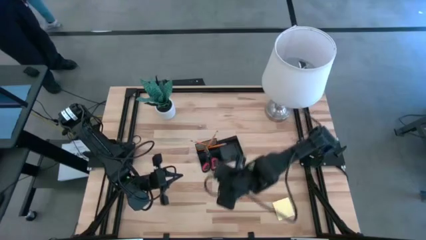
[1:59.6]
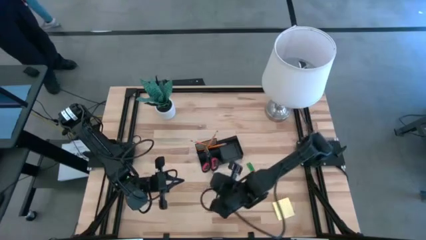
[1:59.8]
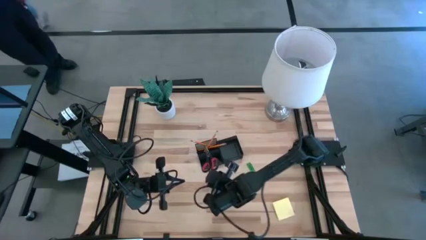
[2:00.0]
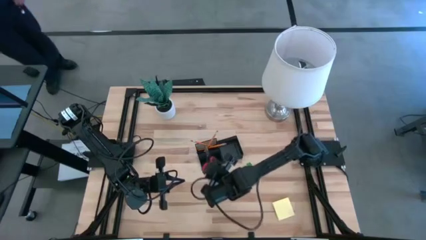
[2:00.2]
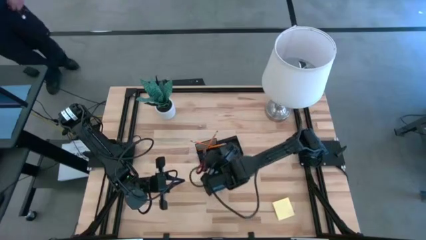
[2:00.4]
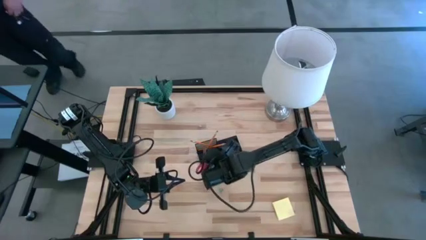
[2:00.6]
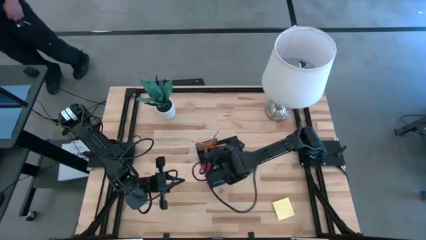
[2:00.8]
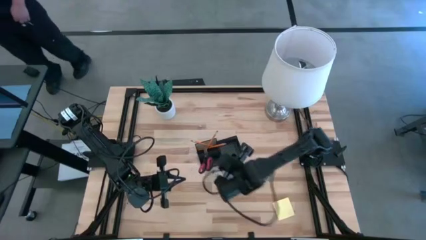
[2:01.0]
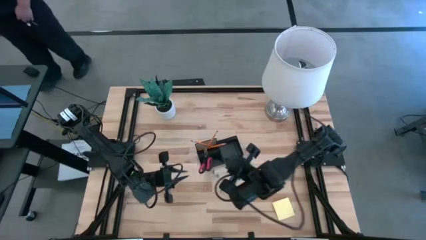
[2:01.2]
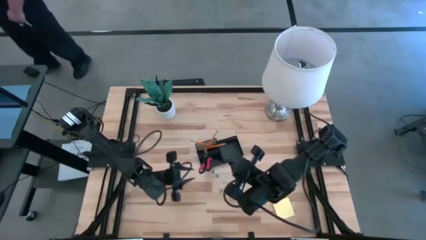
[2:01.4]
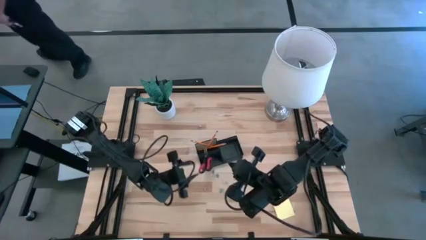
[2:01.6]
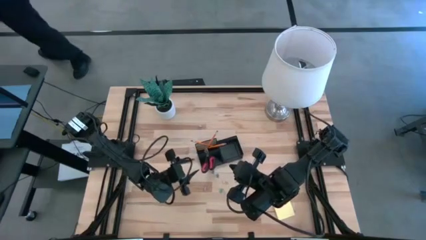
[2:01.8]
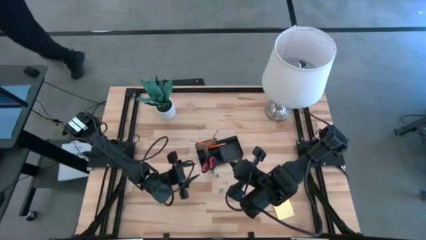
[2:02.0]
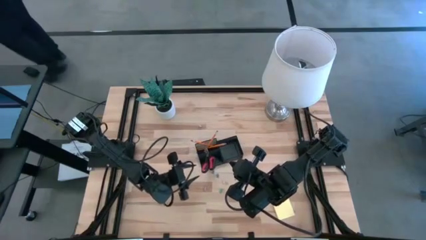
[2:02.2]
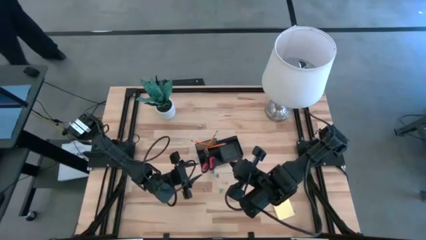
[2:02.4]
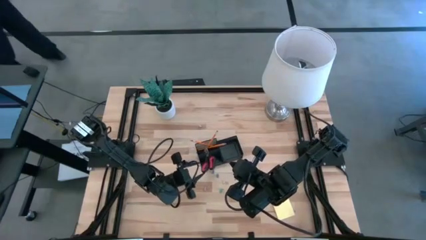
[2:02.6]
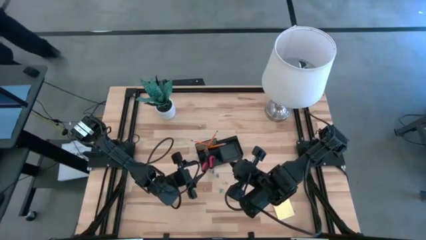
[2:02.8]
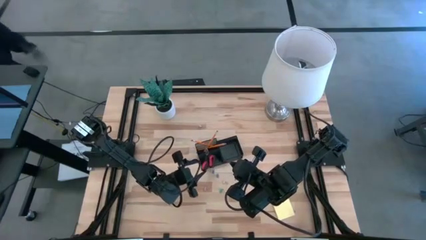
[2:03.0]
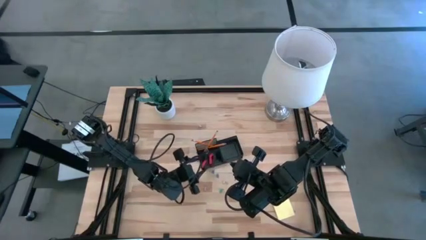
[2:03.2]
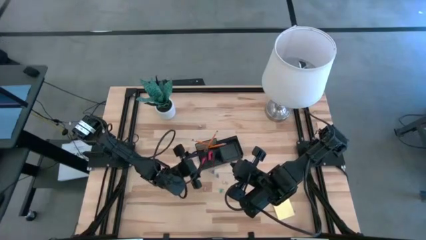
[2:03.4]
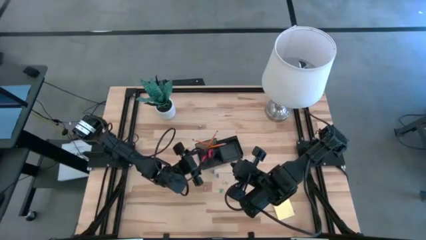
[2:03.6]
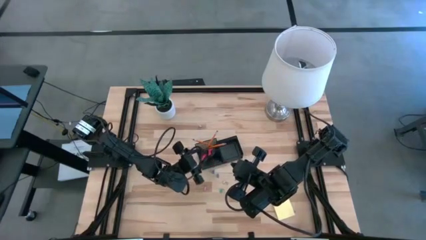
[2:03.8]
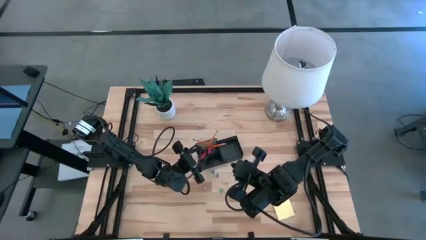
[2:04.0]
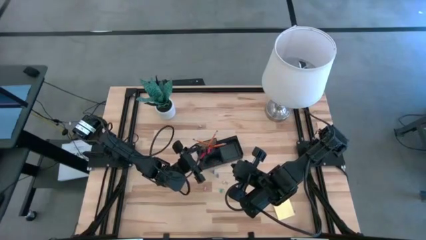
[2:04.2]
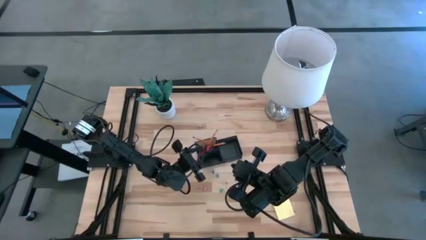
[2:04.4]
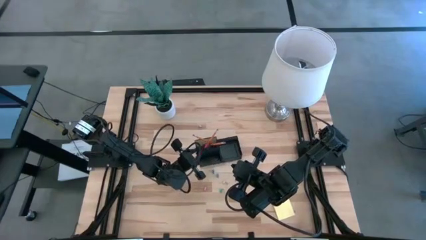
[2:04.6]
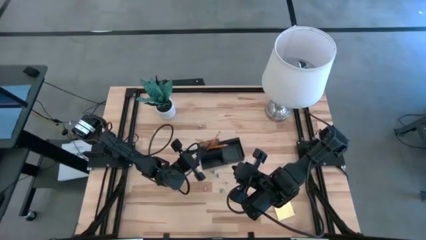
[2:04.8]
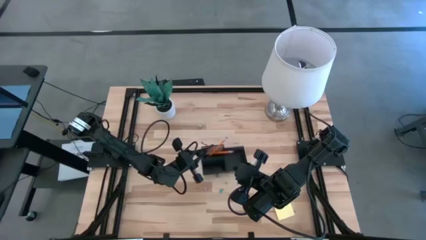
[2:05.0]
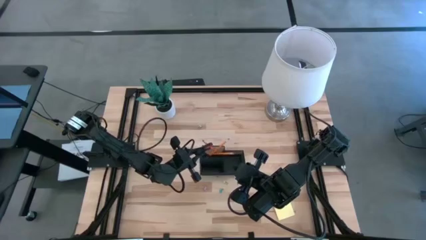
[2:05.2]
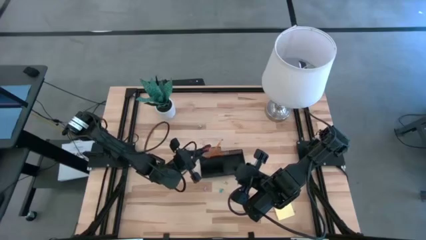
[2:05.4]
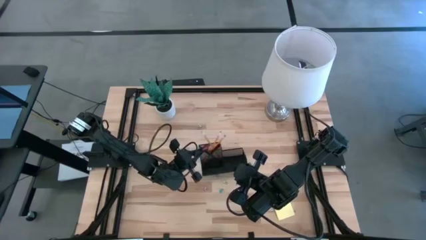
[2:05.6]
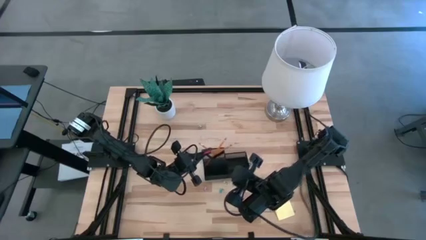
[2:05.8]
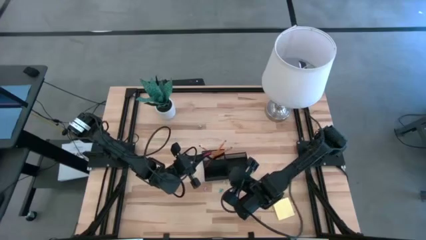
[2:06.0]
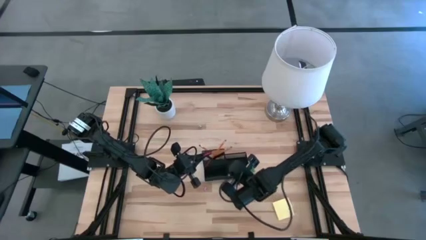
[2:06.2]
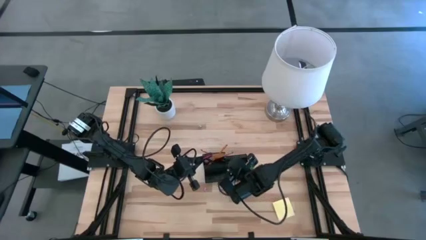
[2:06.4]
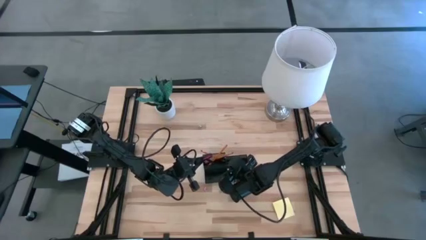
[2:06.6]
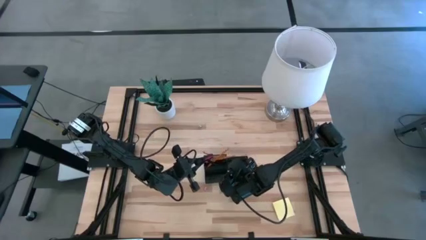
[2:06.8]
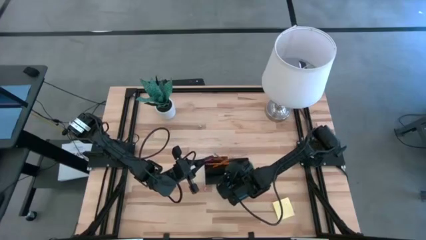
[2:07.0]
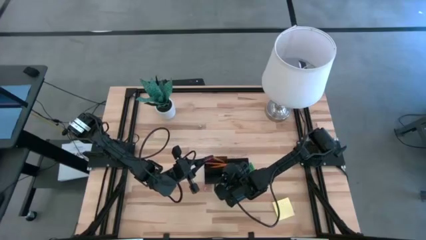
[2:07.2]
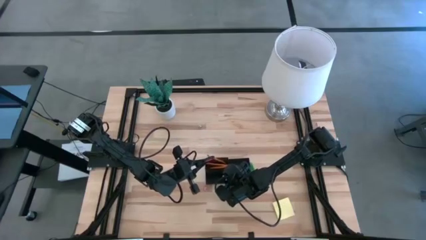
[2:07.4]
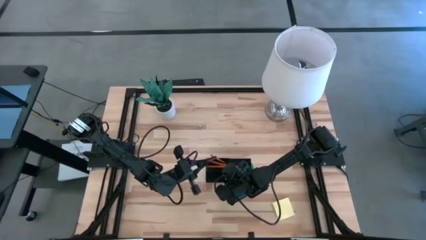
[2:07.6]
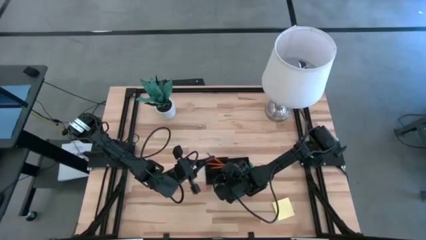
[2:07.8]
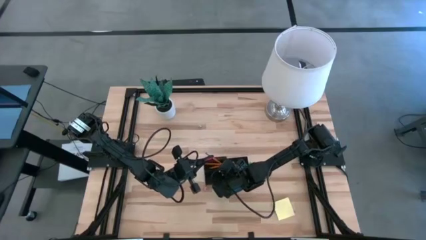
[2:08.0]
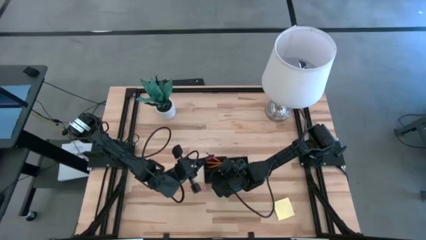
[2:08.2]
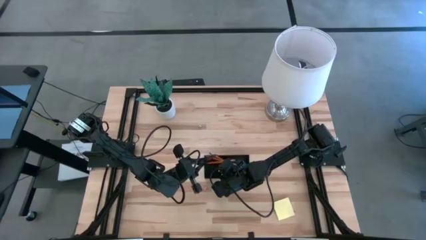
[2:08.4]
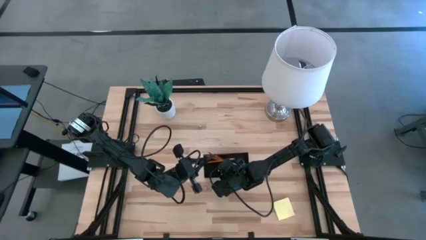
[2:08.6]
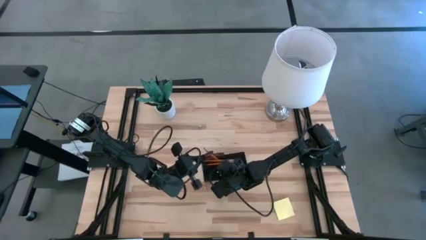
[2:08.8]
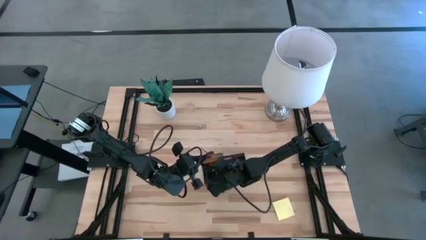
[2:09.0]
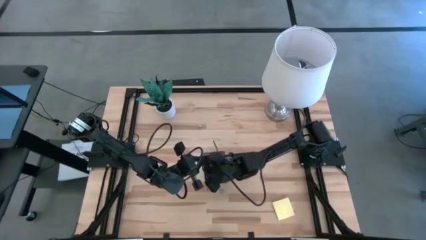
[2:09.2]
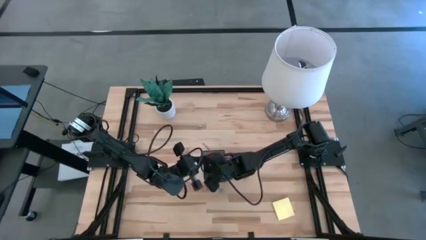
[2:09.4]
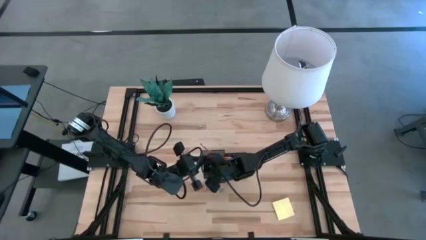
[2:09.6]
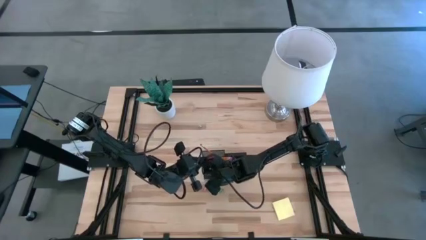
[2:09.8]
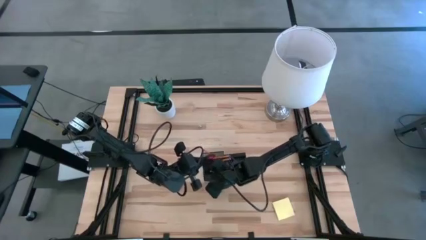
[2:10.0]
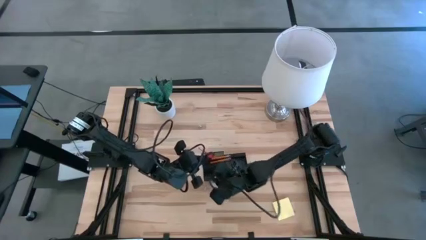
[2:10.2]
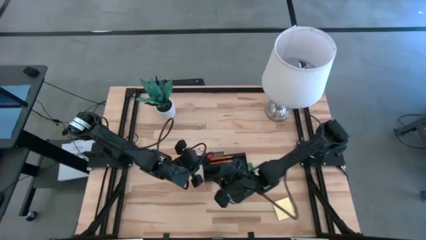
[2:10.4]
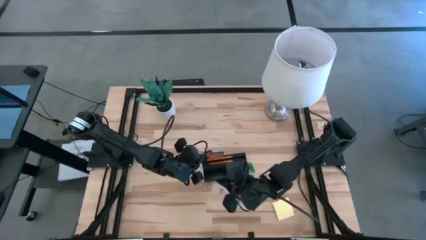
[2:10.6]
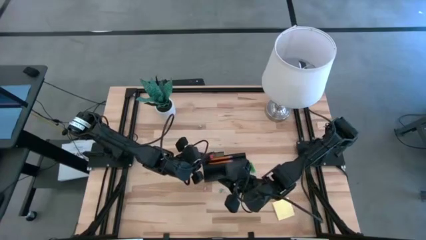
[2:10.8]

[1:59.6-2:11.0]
Task: Pick and place office supplies into organizer
Put the black scissors into the black desk organizer

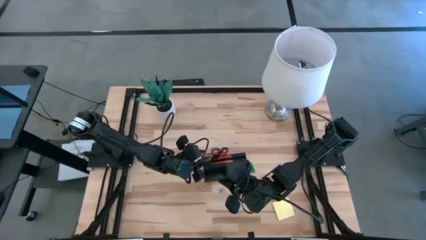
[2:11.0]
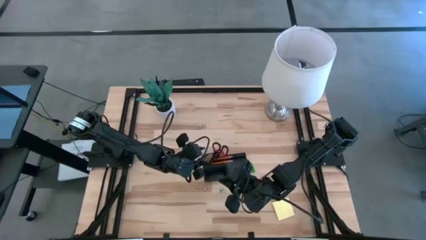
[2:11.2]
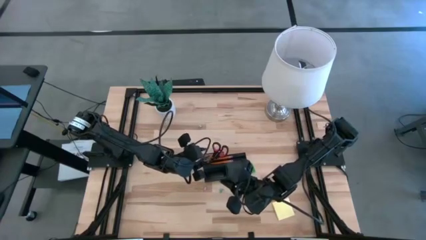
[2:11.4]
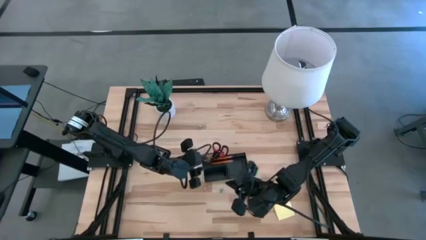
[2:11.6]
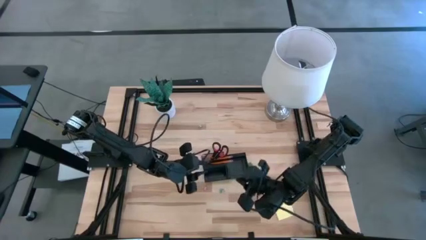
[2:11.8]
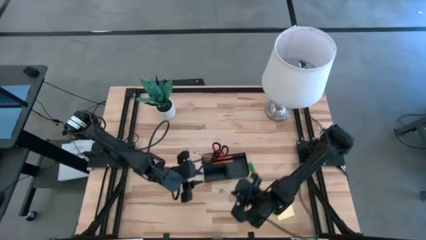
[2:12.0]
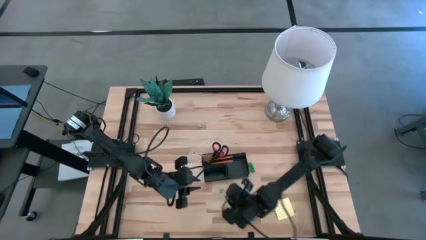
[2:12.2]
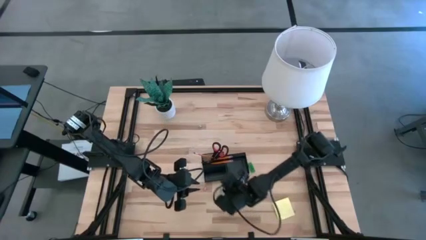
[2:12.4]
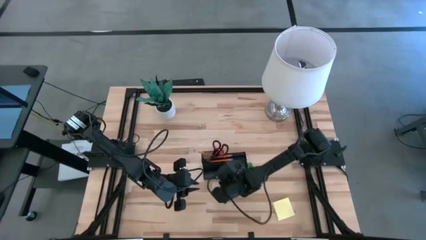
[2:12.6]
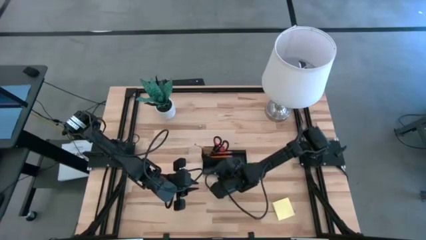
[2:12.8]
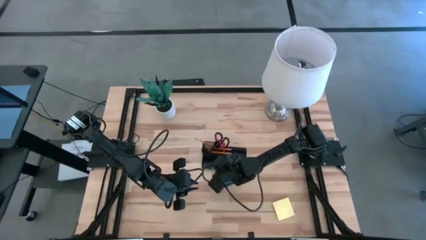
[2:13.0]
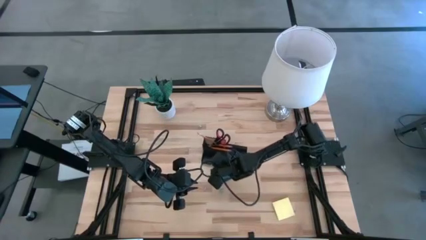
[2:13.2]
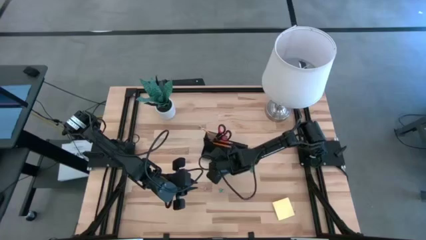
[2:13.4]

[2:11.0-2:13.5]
Adjust the black desk organizer on the table

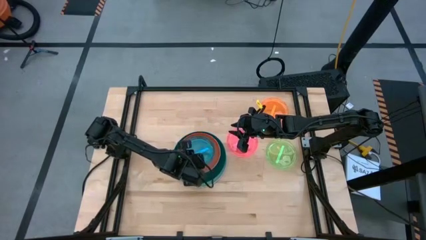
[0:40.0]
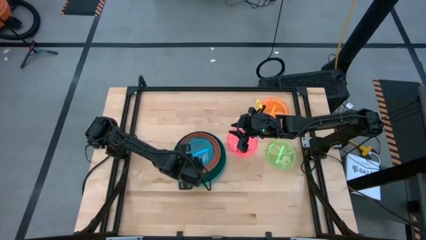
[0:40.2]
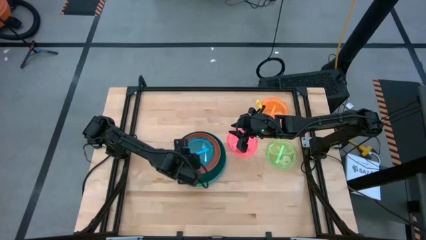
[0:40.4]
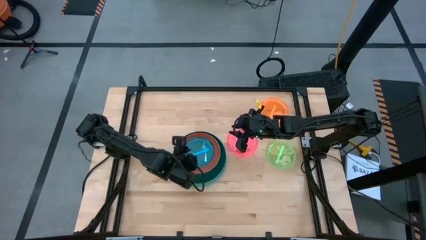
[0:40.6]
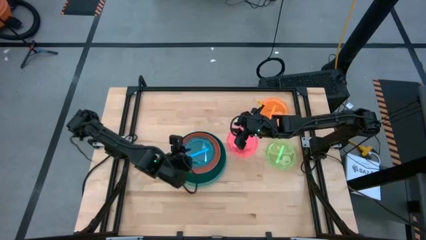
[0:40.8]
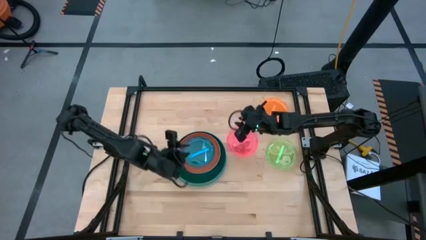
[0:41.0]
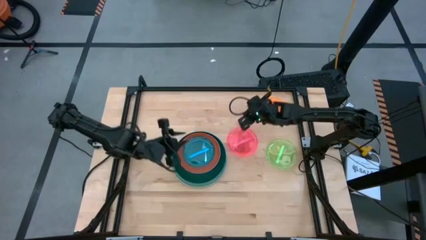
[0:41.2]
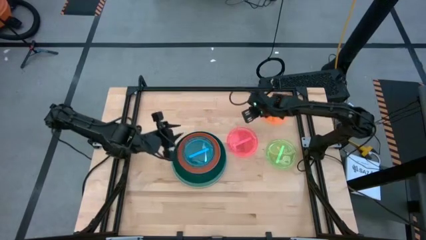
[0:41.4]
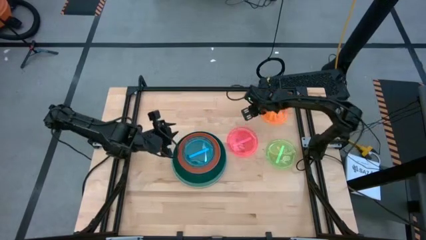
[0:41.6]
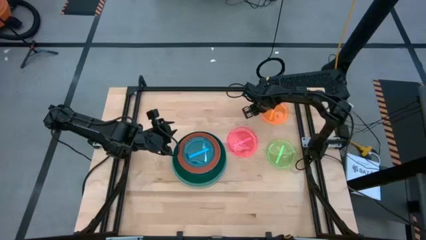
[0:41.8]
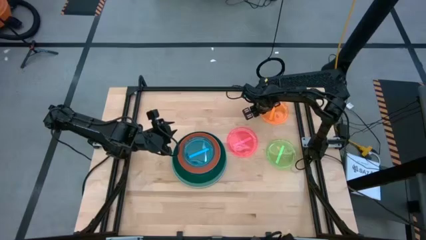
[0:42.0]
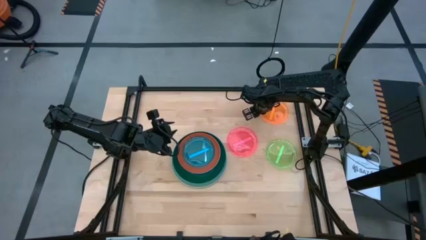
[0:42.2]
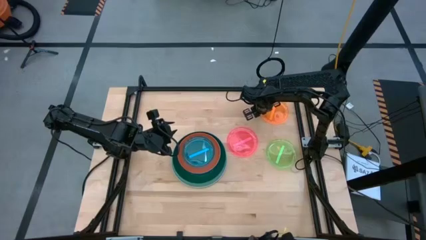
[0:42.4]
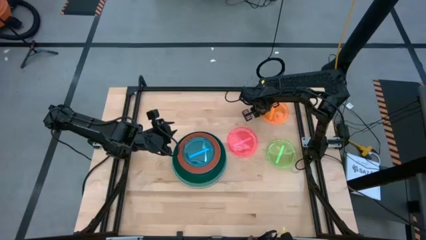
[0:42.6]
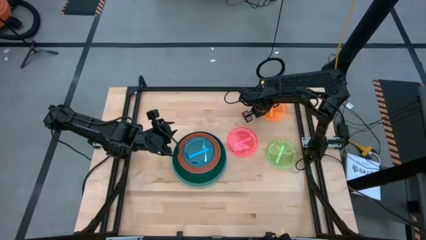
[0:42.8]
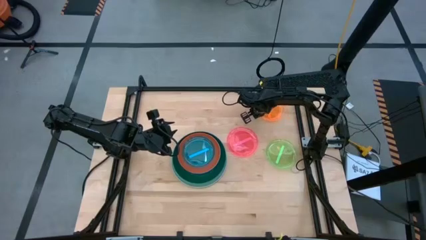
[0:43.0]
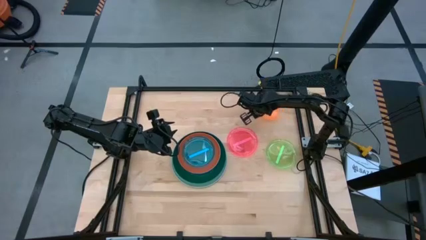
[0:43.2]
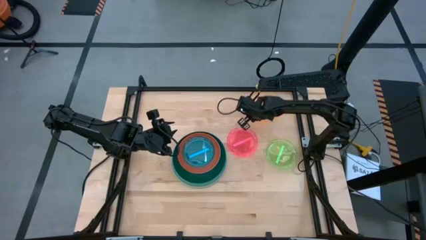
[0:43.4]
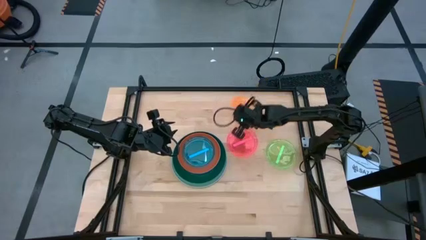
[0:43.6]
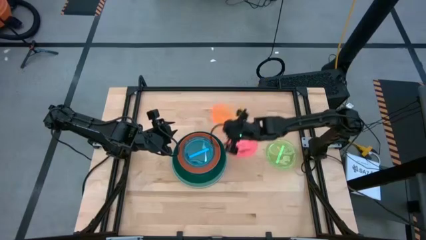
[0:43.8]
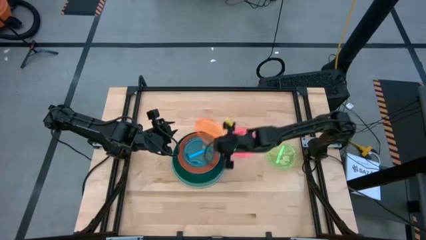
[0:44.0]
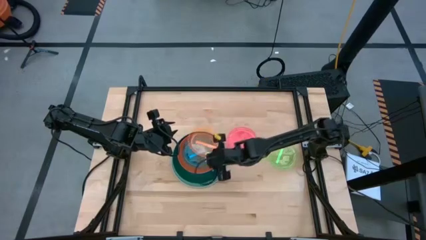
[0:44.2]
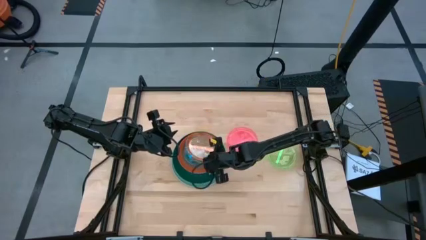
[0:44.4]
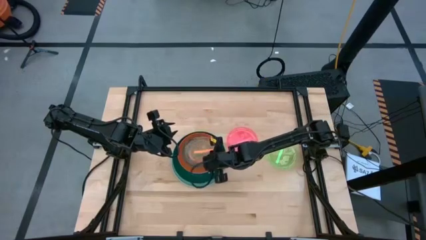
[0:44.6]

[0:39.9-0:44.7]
Task: Stack plastic plates
Stack the light orange plate on top of the light blue plate
